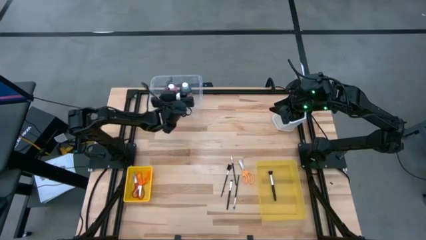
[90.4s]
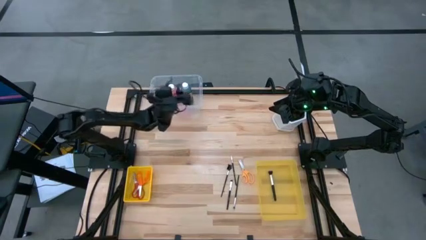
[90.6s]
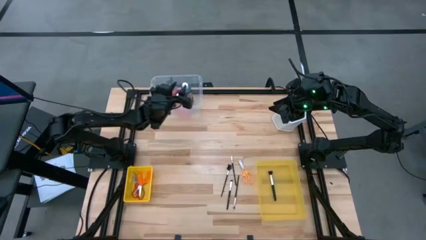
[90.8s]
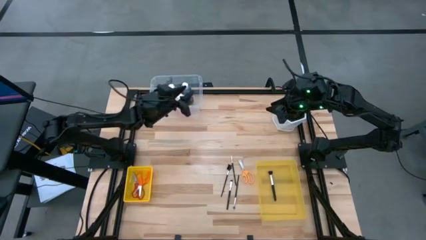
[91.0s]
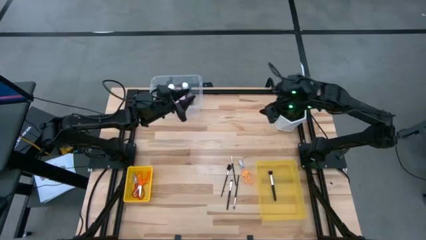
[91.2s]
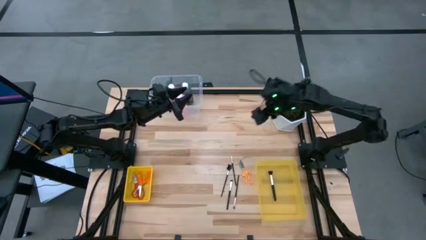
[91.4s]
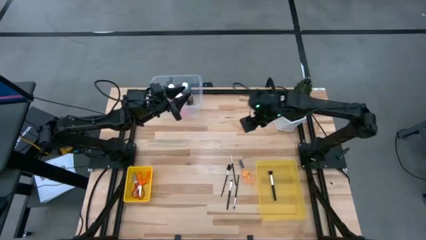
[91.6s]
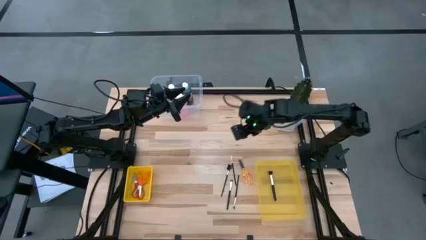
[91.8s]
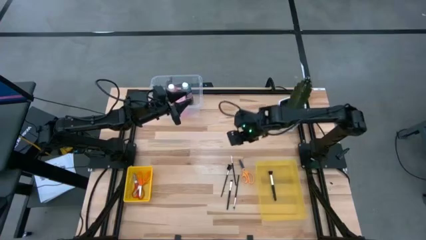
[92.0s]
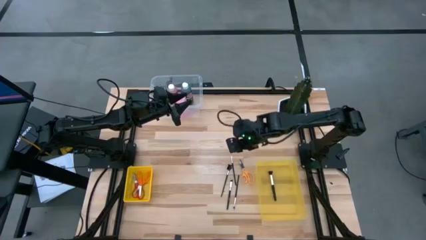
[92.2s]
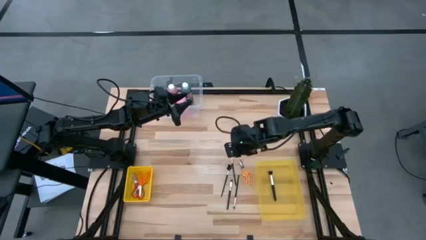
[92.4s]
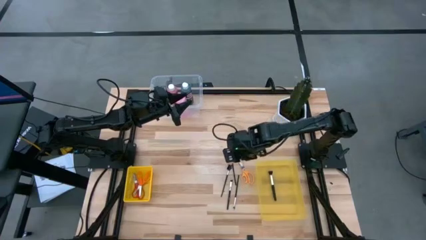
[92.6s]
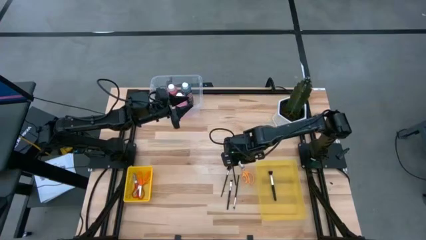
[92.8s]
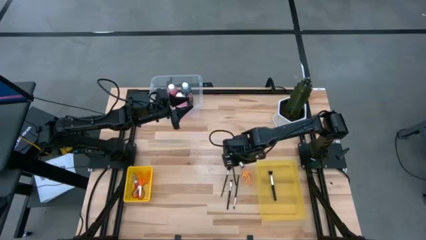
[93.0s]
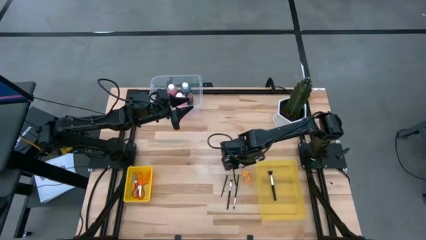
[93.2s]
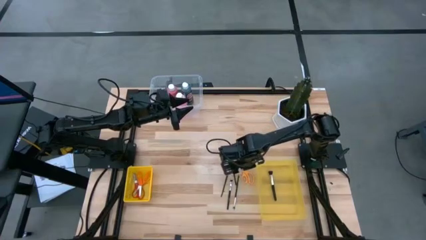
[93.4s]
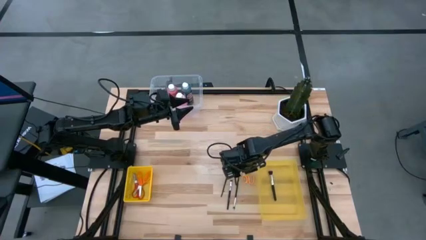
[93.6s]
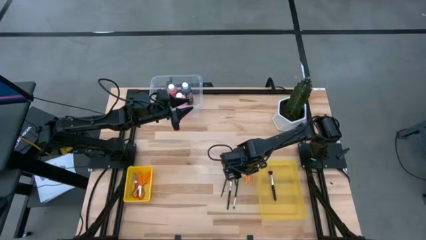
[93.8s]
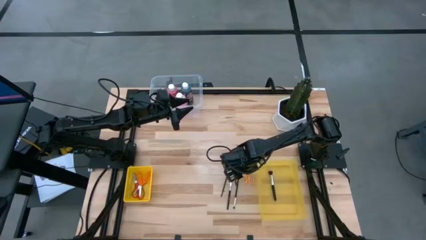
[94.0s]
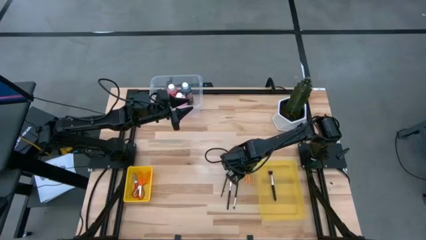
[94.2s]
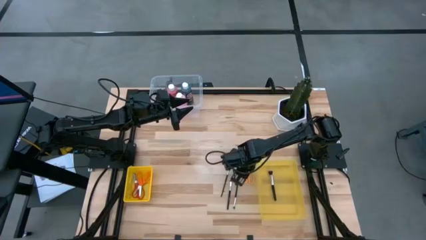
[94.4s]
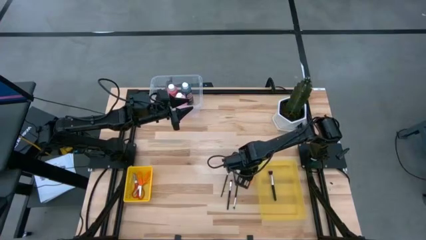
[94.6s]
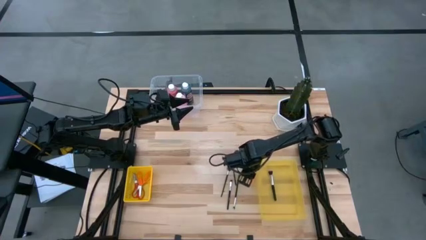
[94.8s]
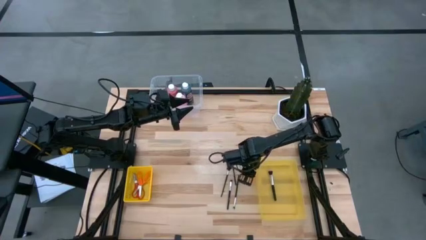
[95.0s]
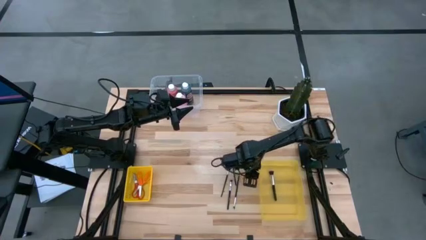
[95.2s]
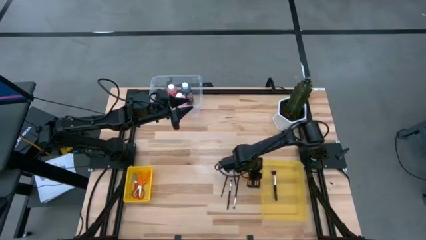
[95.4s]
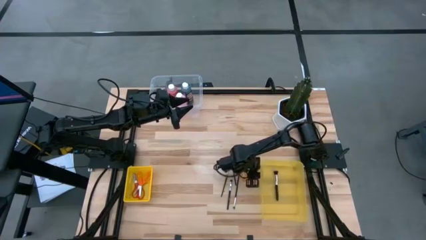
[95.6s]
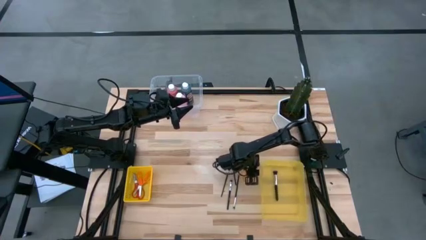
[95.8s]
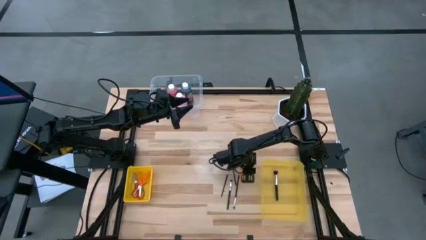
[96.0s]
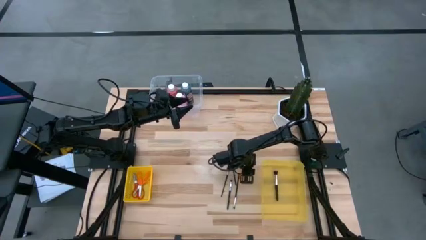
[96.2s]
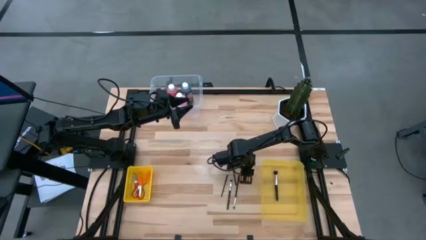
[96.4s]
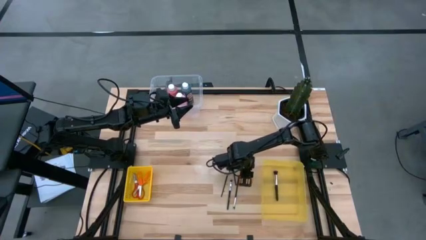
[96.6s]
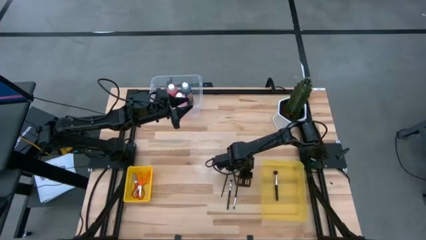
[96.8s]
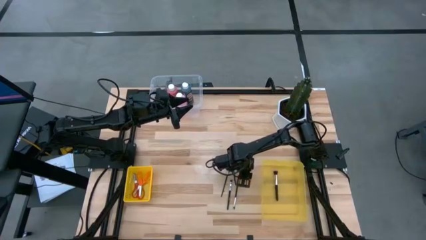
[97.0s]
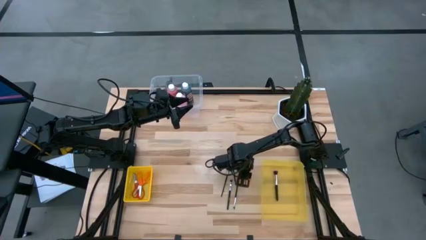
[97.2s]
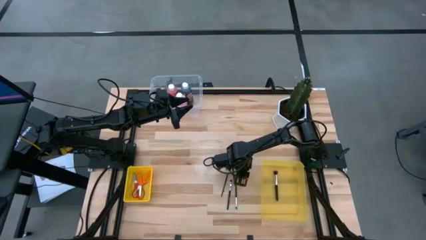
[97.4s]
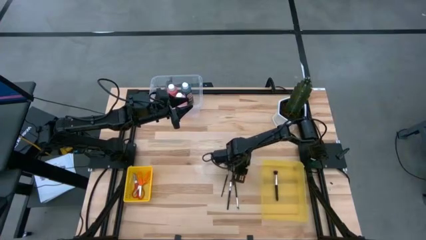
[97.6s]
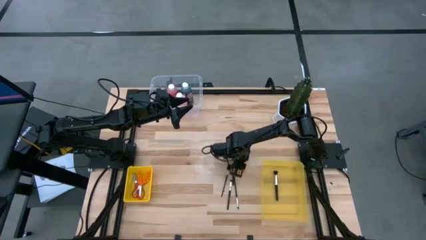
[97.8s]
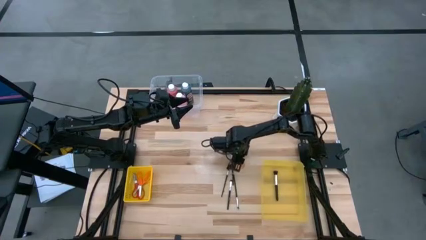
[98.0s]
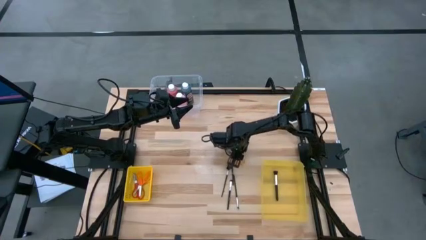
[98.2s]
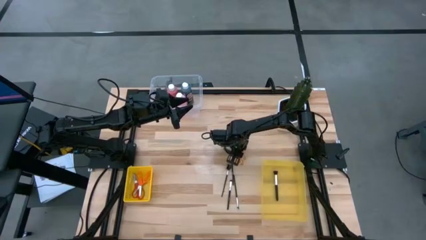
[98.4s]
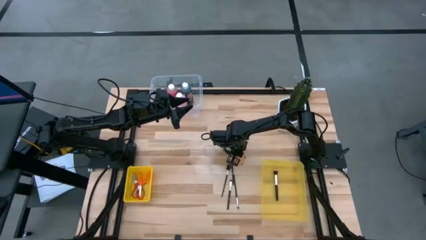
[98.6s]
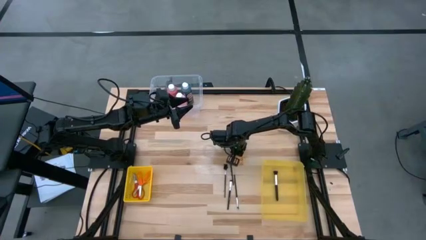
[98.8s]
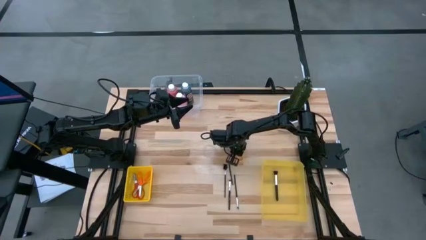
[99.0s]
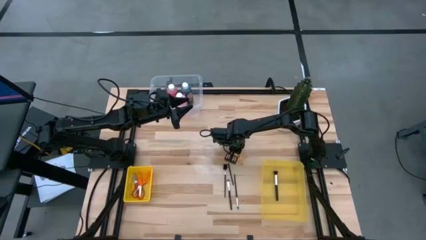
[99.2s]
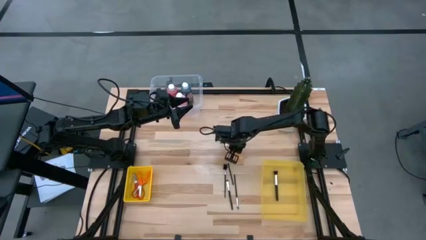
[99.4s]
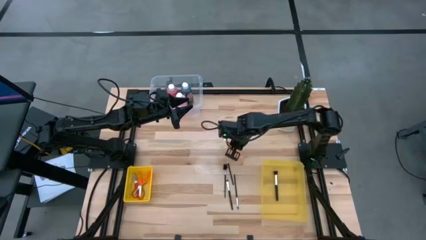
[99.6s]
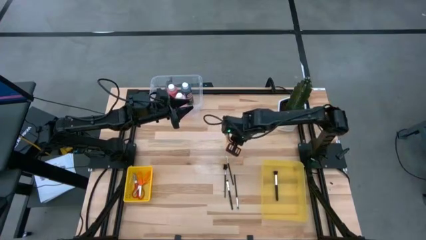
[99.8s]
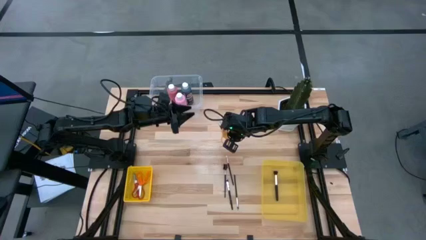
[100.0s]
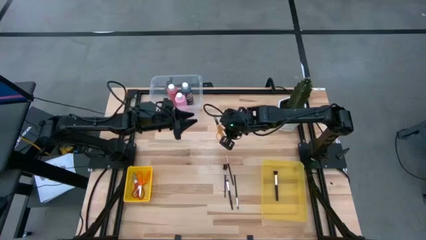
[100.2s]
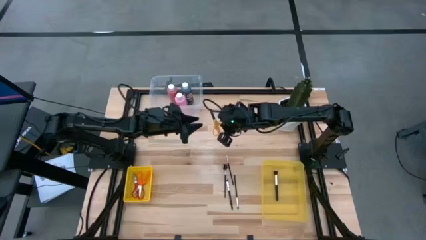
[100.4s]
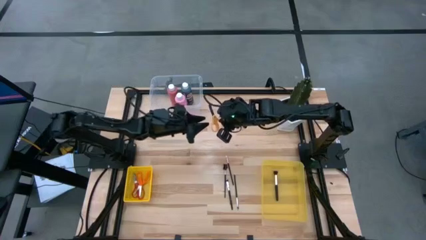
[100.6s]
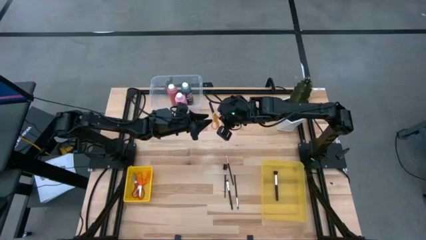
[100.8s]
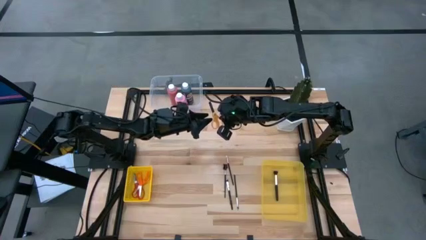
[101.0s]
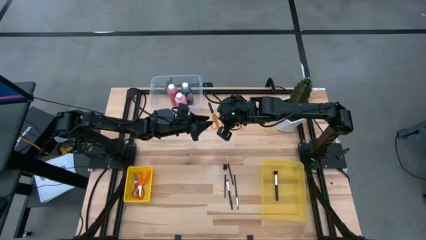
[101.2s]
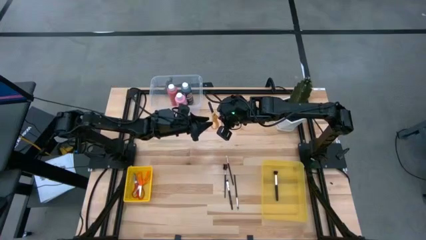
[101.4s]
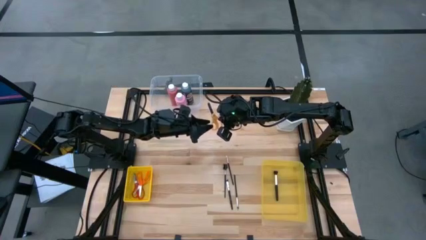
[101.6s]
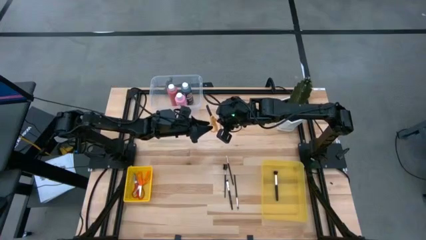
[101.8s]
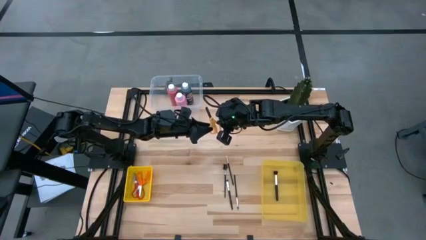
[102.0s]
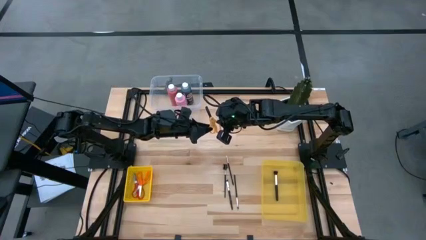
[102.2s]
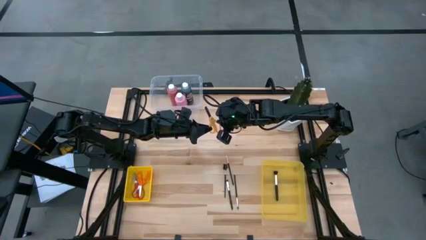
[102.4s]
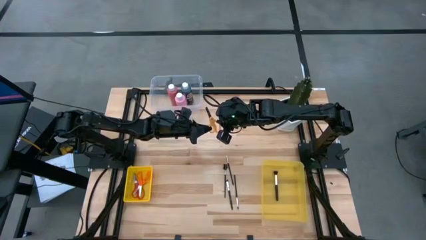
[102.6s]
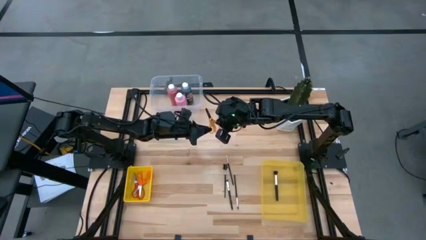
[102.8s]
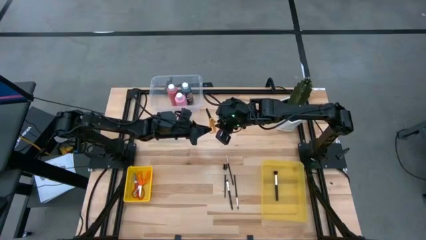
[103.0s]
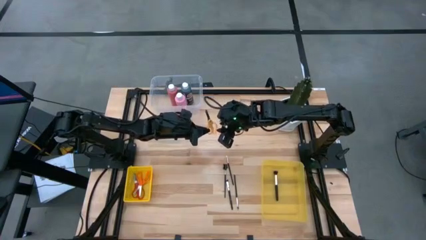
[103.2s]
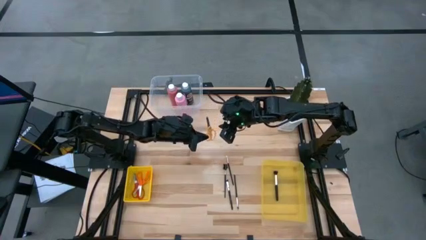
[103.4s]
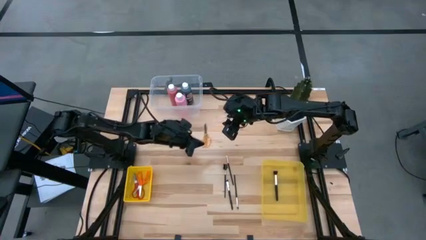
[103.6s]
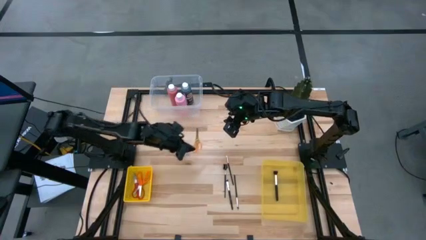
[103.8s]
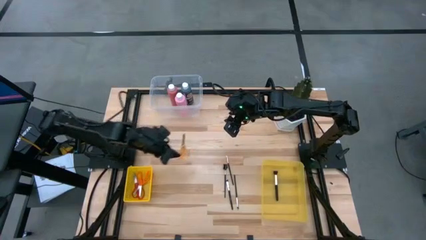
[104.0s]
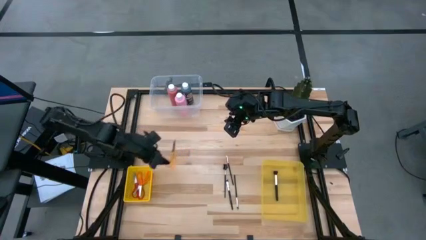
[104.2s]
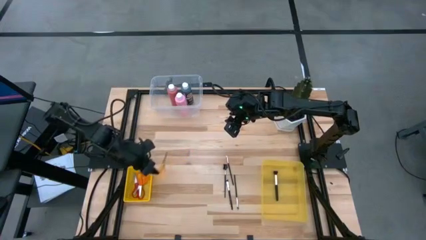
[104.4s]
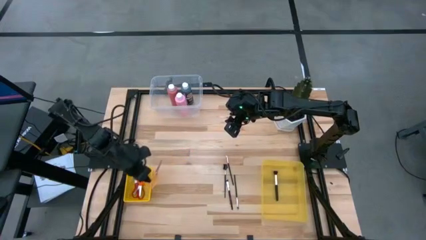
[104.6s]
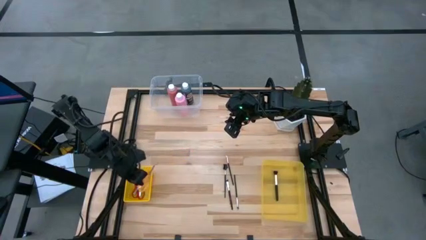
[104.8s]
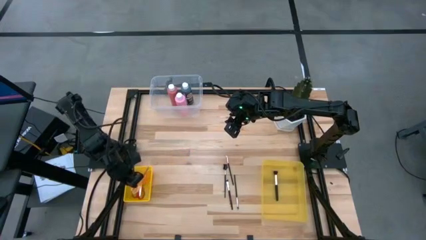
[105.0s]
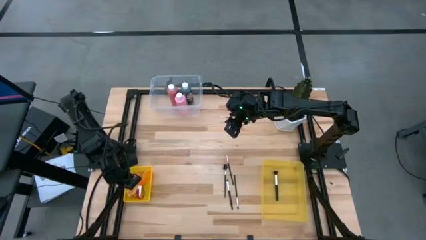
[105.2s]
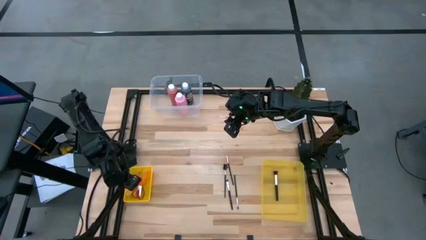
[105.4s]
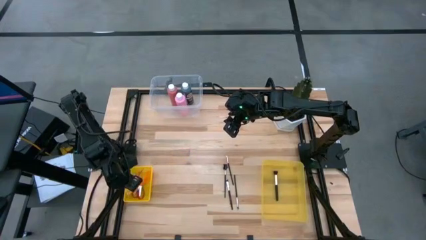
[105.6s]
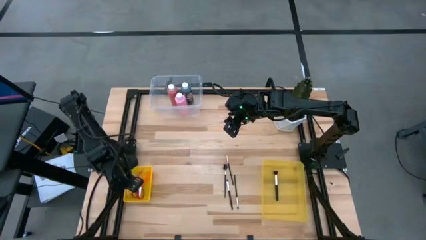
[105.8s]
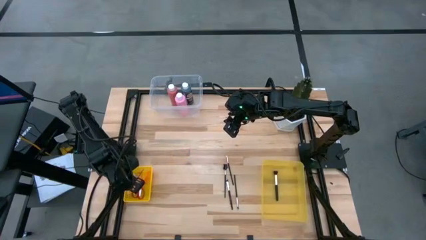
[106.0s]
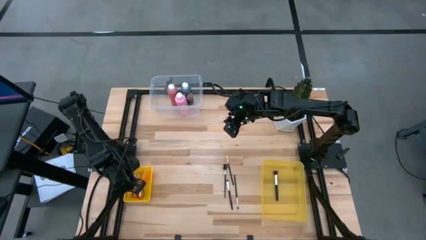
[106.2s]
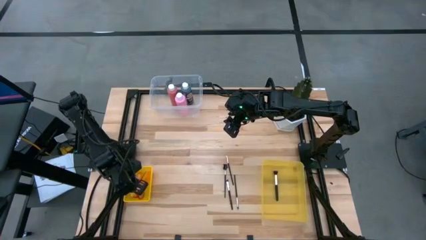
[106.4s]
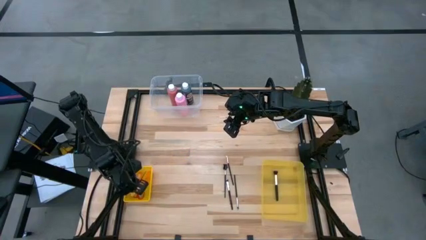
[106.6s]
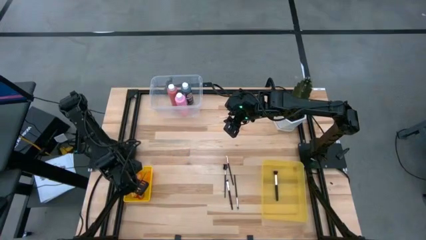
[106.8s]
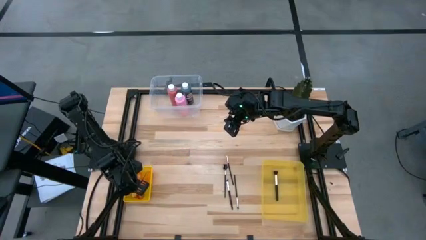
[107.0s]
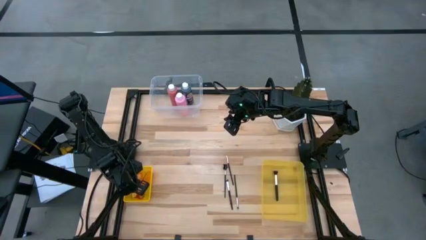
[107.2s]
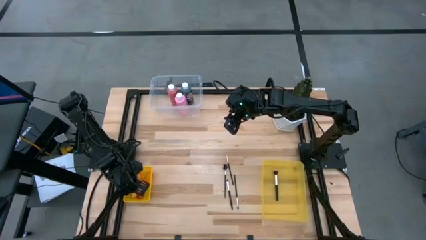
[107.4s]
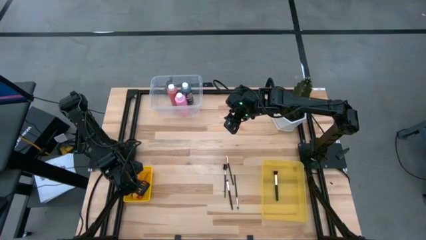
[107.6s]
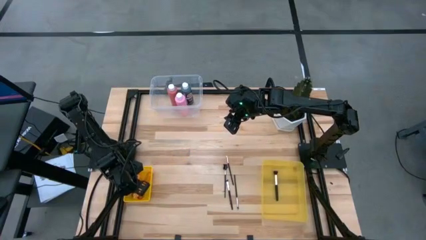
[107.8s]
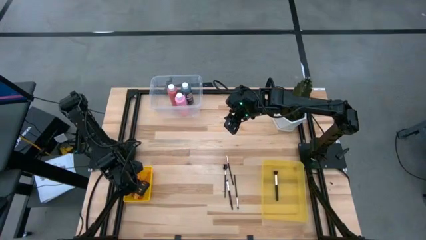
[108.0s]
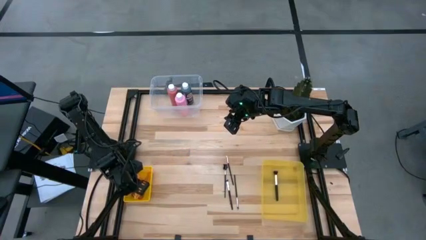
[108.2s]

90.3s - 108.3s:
Task: Pick & Place Paint Supplies
Put the yellow scissors into the yellow basket
